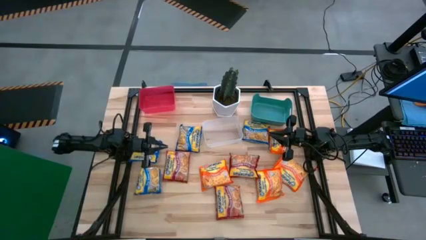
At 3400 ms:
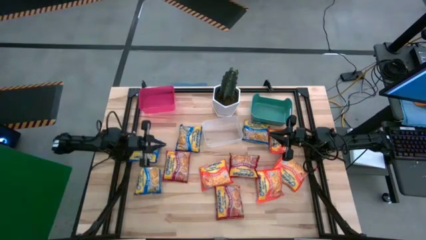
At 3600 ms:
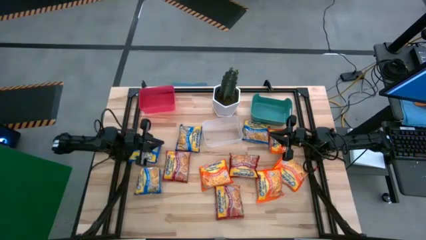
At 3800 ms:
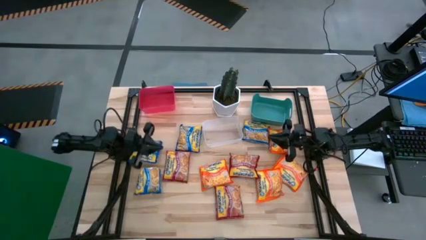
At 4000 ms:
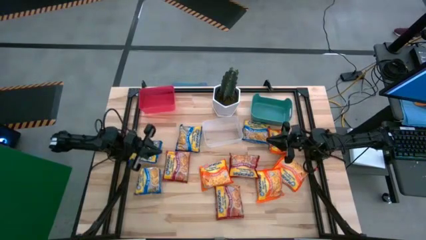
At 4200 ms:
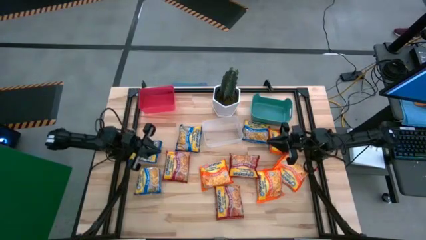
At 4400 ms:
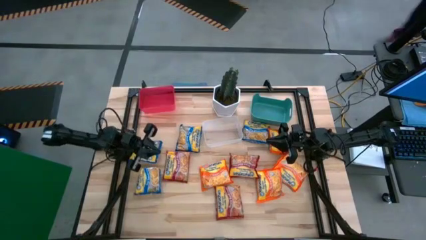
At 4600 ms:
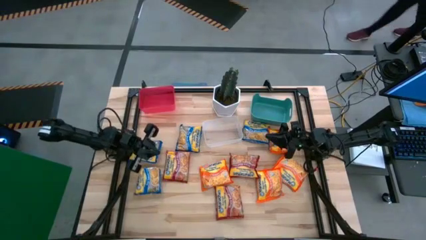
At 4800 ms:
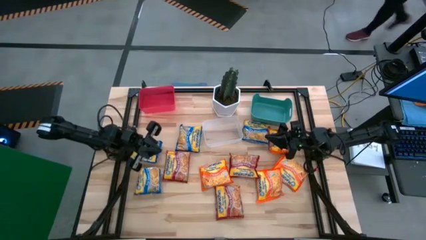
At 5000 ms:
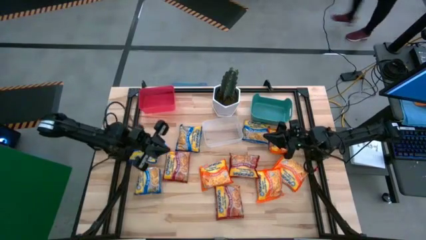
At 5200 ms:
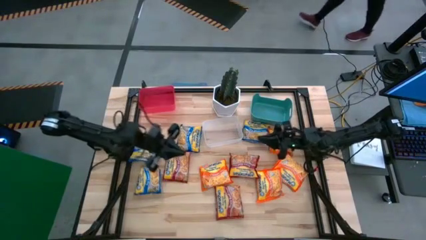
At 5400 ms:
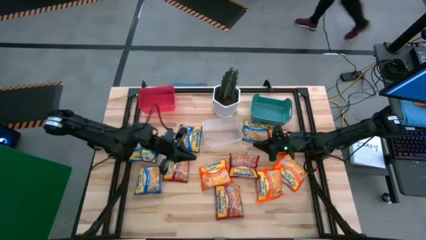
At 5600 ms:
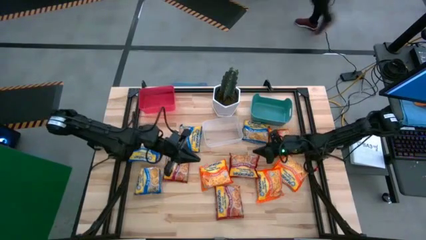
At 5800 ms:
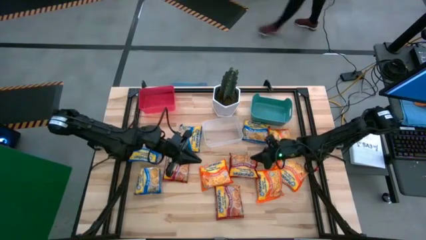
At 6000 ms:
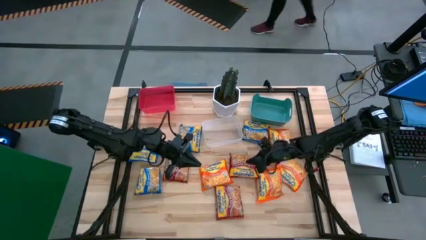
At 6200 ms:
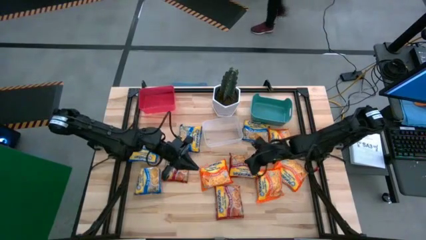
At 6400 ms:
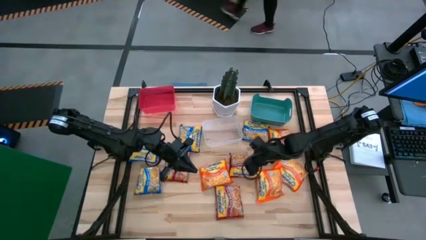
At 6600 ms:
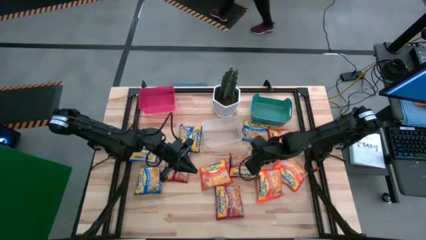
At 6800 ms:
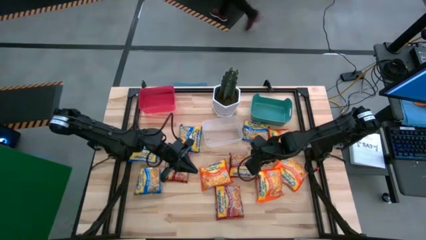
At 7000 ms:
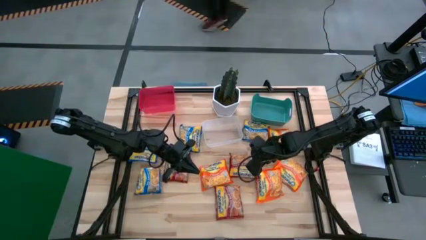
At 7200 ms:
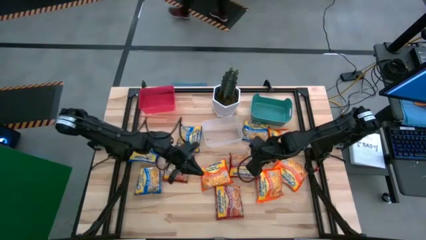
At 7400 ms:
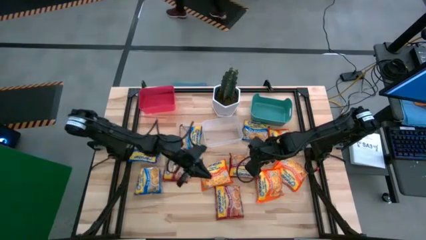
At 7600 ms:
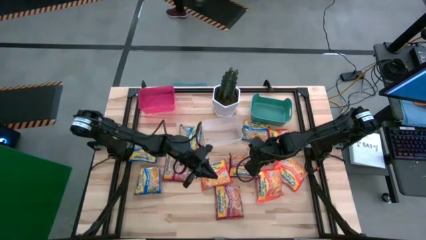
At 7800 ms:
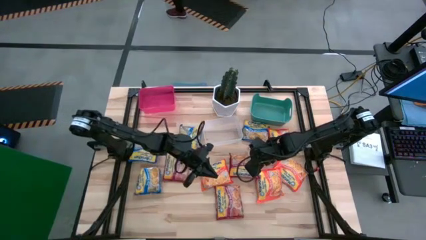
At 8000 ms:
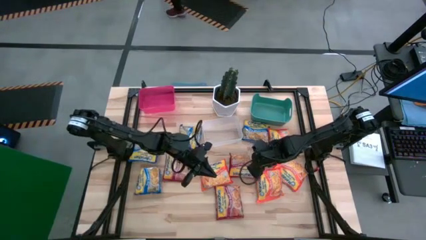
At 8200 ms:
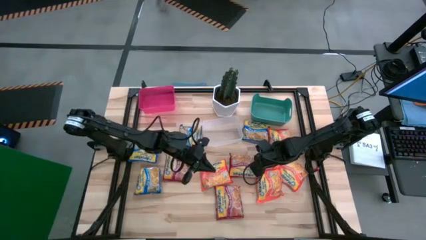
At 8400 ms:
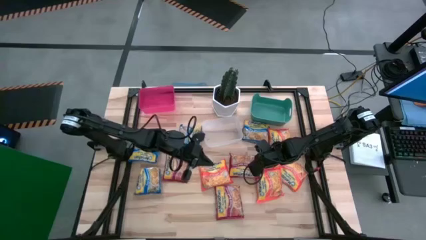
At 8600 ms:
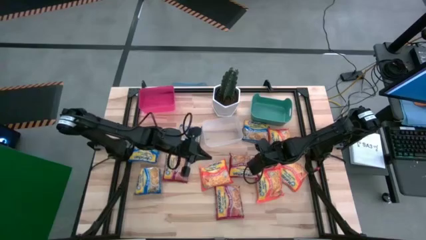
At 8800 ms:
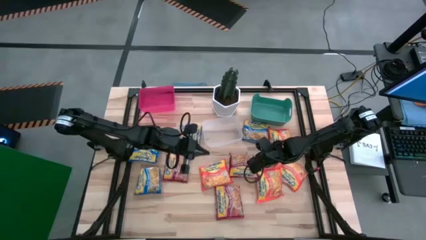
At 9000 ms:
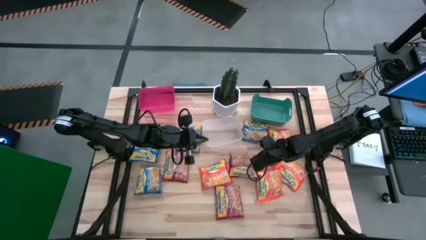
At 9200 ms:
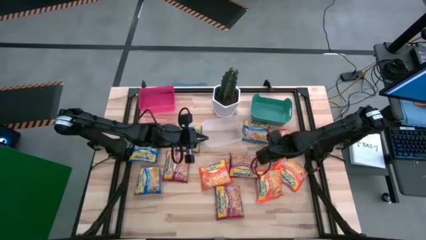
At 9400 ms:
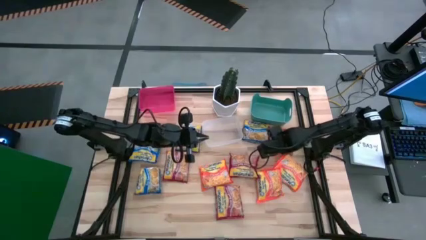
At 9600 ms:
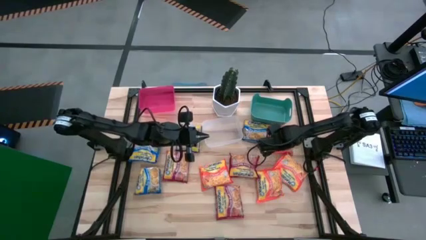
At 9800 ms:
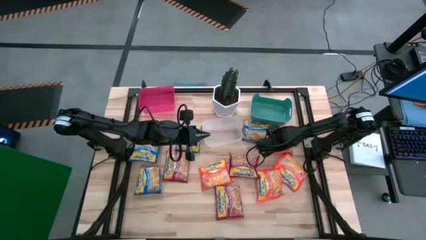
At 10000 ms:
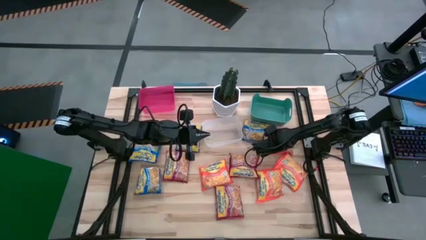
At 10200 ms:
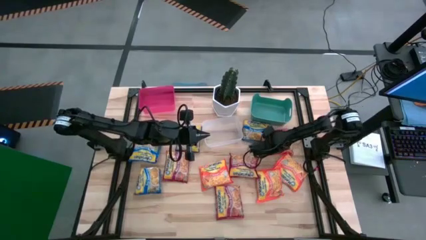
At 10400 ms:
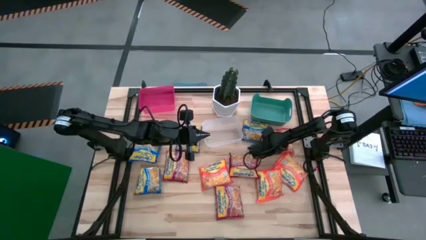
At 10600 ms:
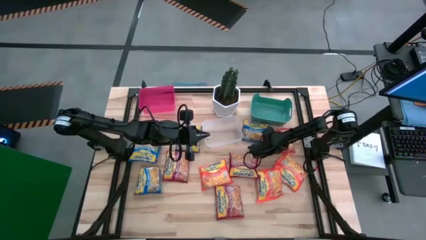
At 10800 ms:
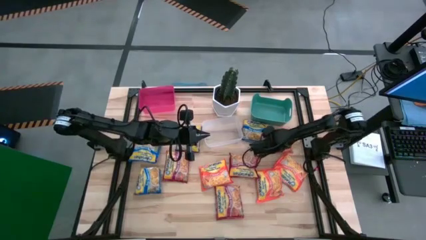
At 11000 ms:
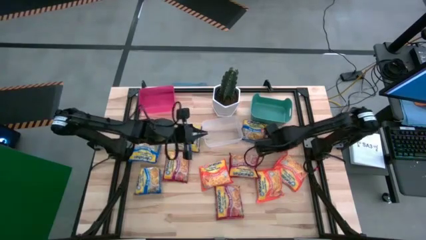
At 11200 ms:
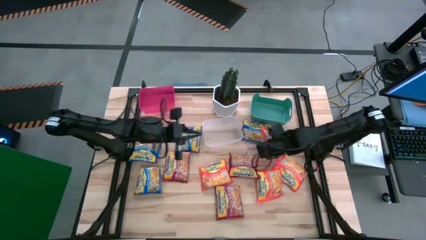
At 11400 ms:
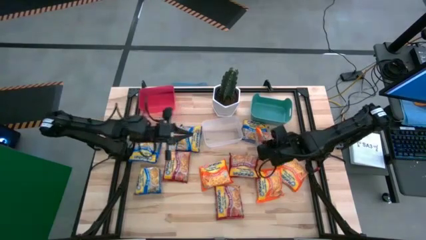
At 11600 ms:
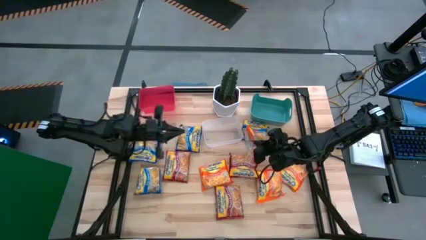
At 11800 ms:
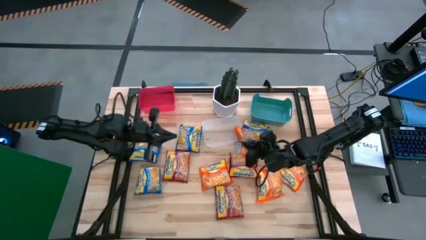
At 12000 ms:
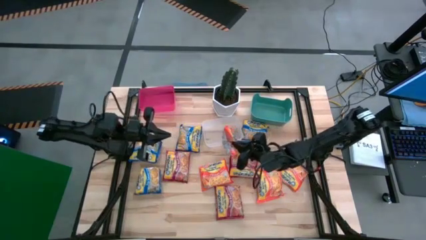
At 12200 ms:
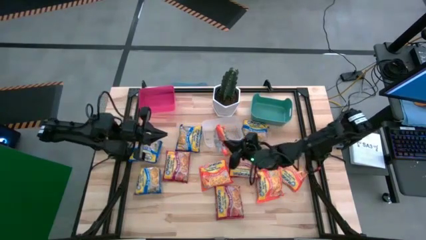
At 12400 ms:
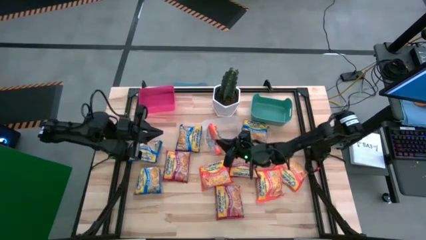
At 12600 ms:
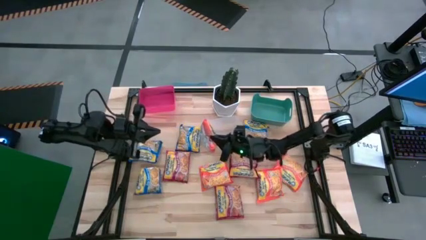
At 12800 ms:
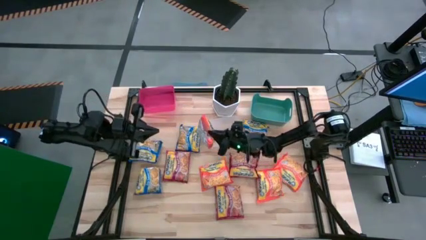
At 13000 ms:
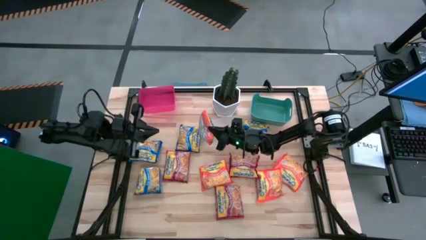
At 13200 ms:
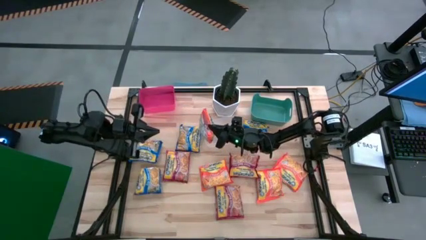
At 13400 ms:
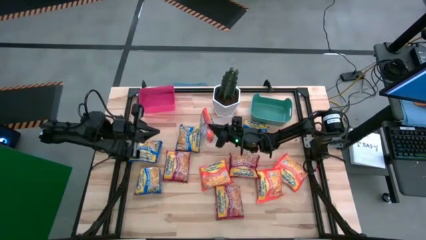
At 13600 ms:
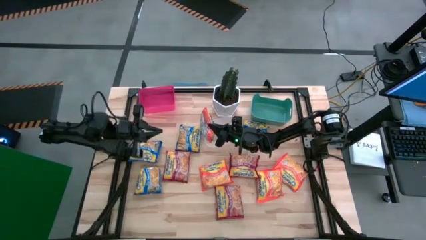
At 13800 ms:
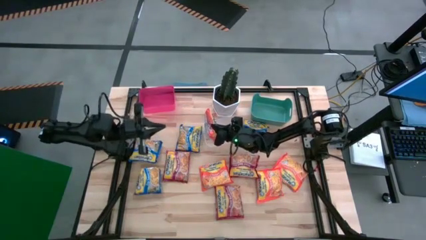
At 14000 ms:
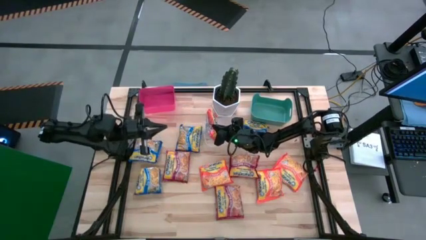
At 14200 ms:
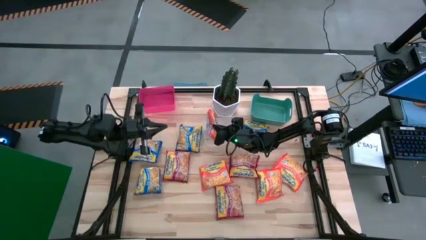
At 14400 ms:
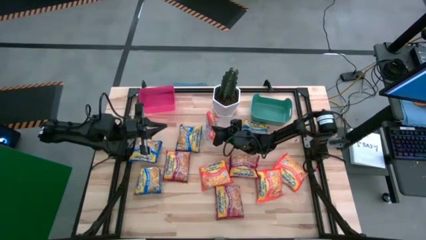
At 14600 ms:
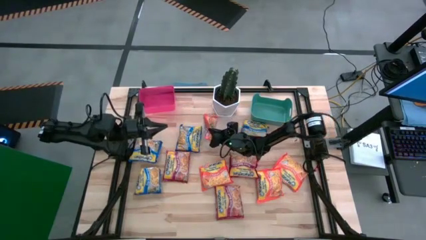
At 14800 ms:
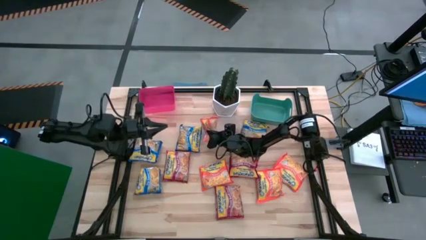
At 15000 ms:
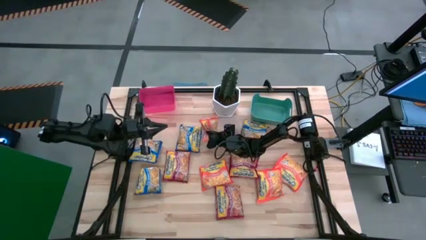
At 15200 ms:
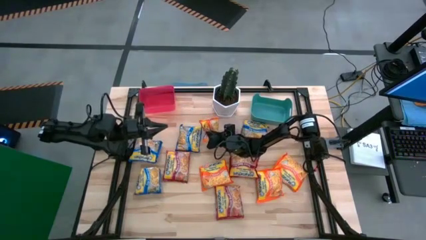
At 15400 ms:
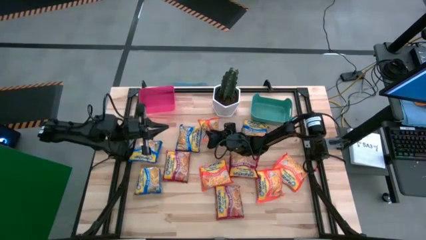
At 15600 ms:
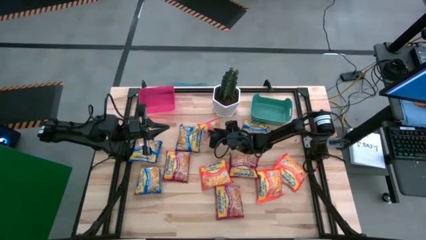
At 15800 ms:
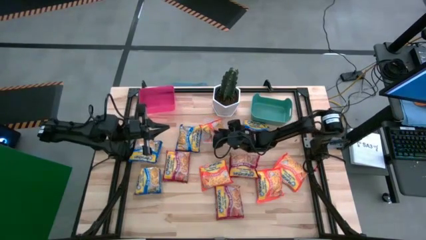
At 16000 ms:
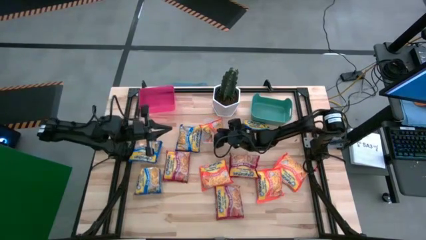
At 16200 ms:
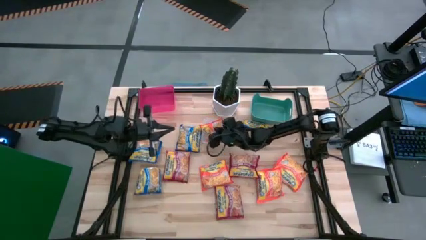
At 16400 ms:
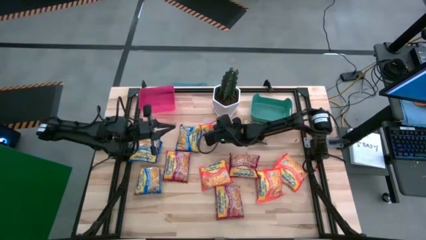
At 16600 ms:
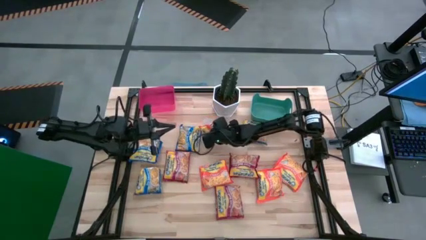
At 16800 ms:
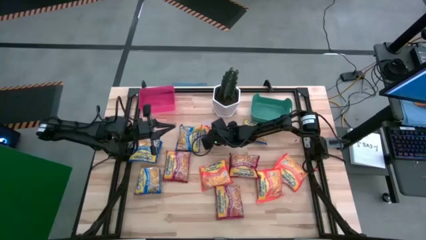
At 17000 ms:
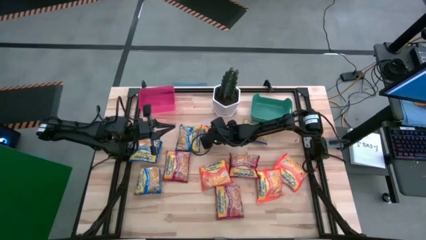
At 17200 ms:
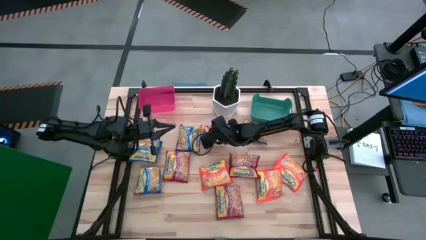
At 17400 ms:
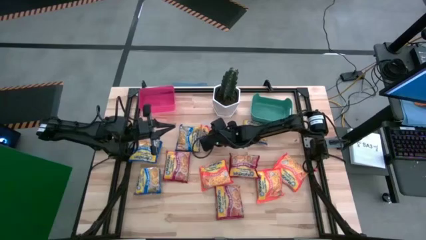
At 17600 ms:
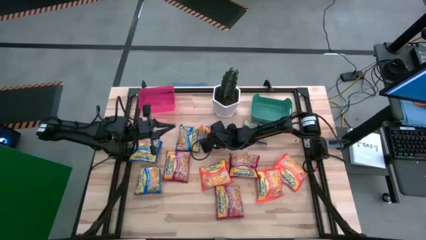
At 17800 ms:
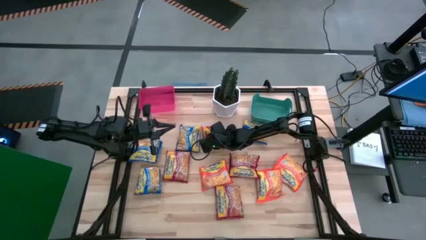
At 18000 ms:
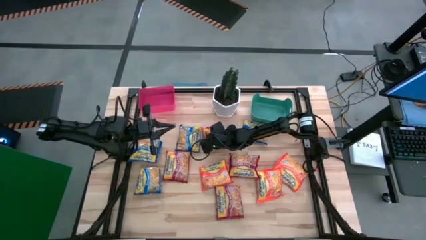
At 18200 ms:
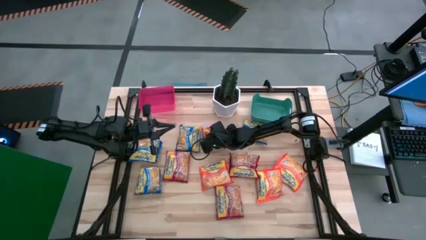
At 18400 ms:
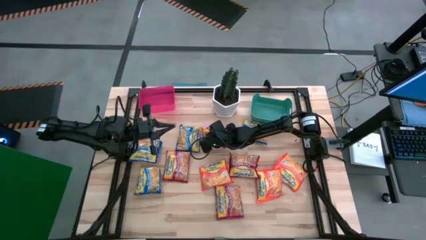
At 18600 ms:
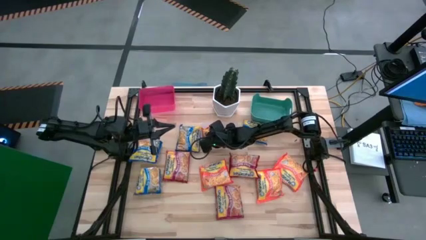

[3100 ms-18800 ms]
Task: Sort Maruchan noodles
Put the orange noodle pack into the transparent bin
